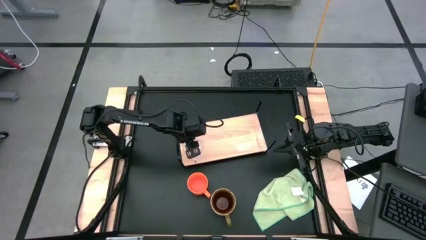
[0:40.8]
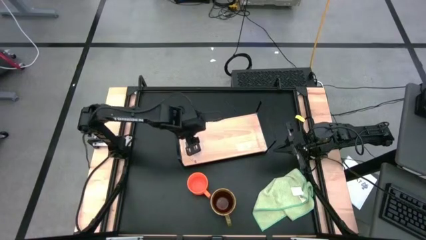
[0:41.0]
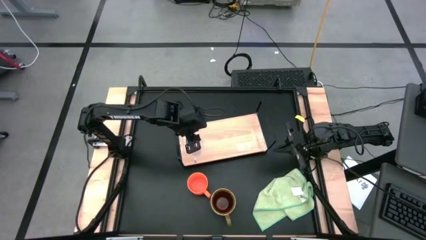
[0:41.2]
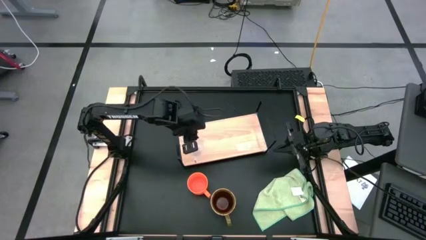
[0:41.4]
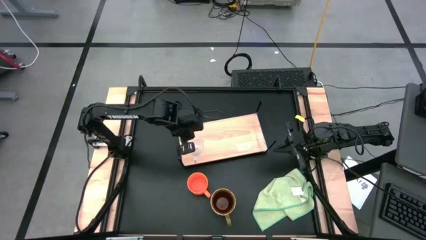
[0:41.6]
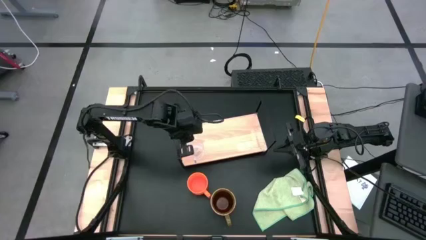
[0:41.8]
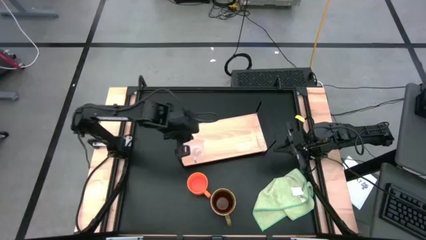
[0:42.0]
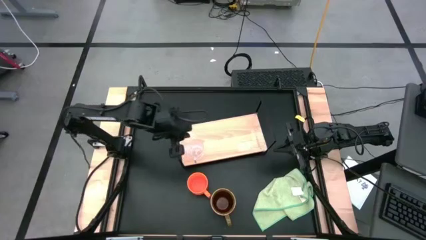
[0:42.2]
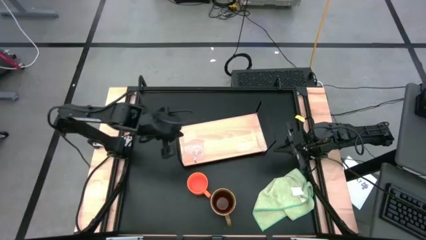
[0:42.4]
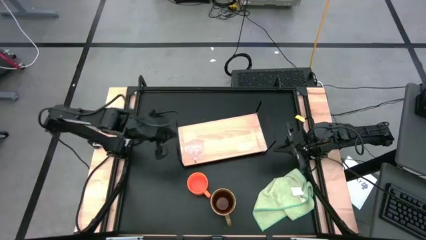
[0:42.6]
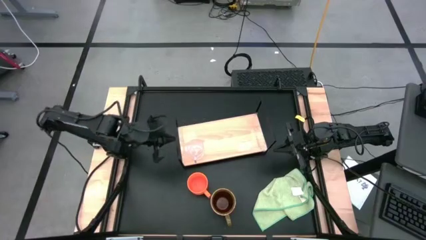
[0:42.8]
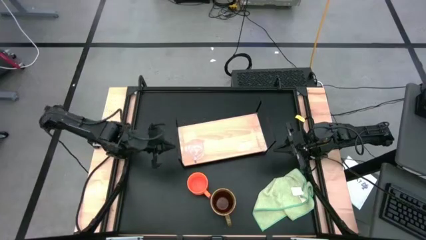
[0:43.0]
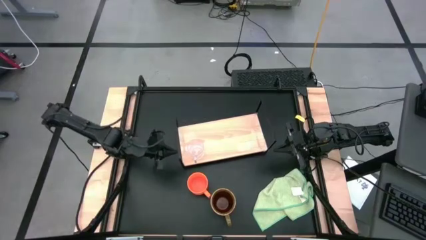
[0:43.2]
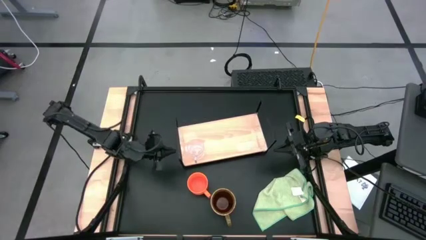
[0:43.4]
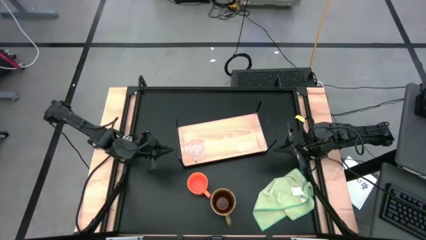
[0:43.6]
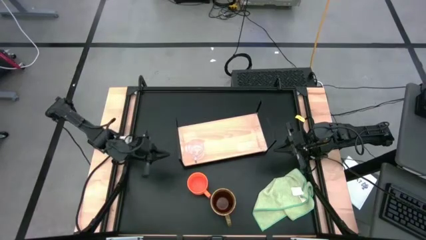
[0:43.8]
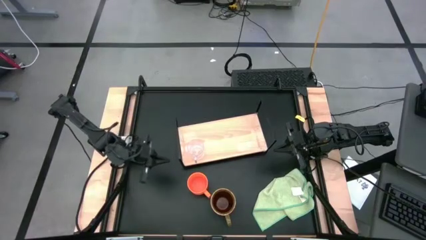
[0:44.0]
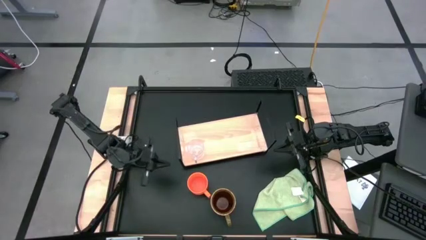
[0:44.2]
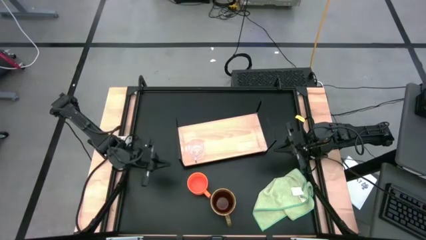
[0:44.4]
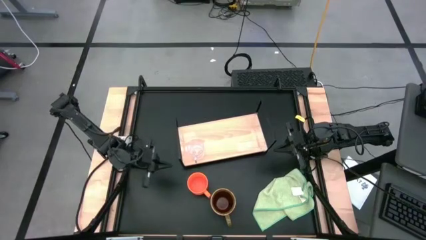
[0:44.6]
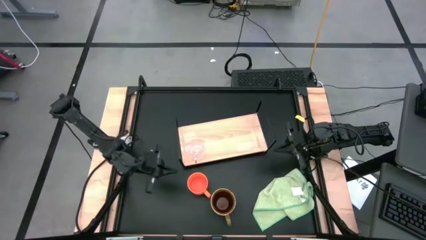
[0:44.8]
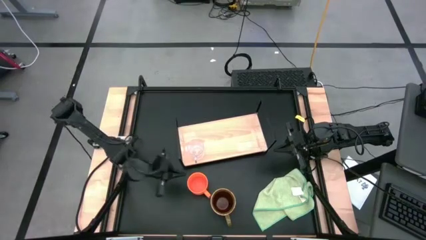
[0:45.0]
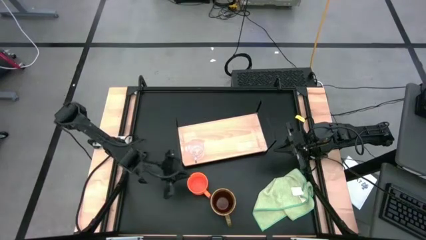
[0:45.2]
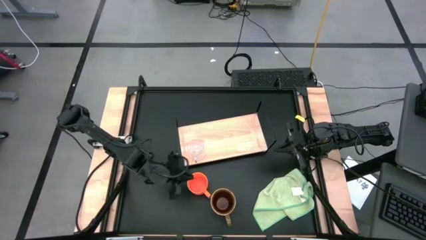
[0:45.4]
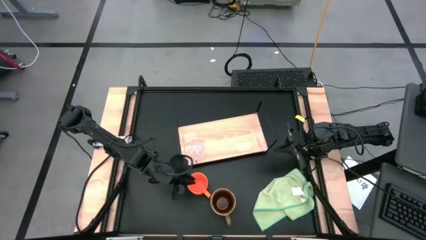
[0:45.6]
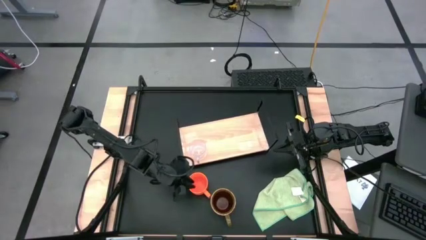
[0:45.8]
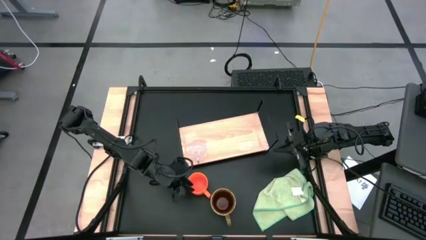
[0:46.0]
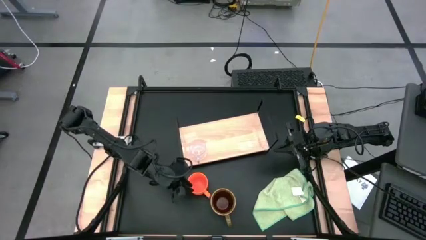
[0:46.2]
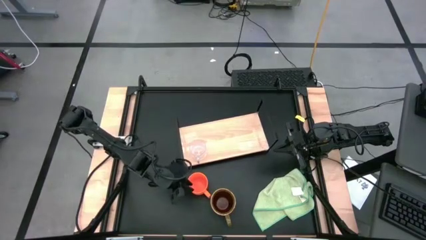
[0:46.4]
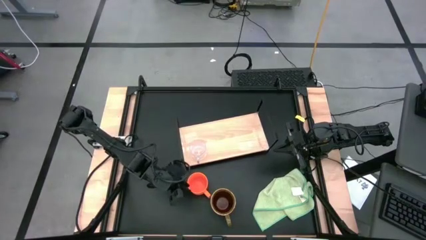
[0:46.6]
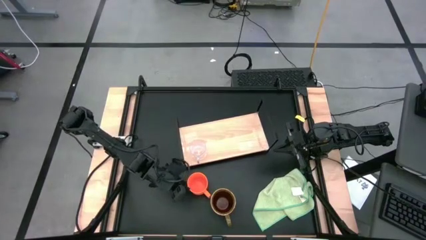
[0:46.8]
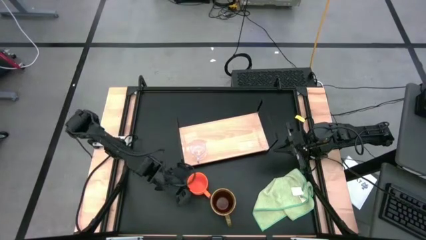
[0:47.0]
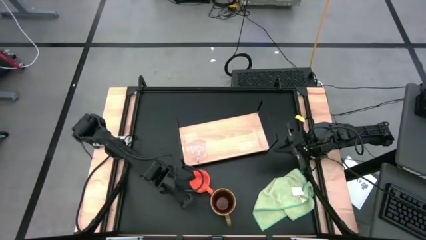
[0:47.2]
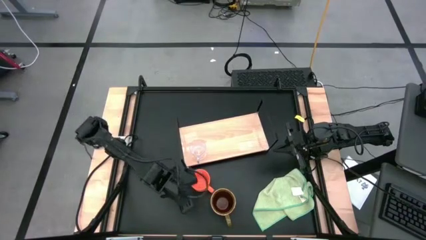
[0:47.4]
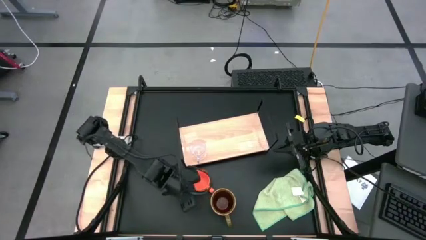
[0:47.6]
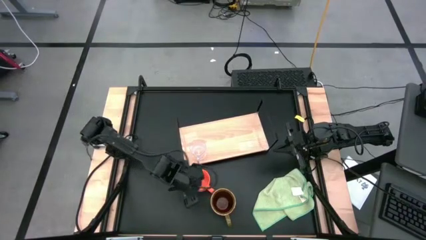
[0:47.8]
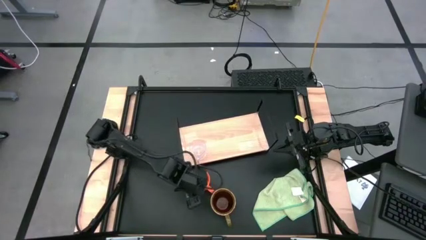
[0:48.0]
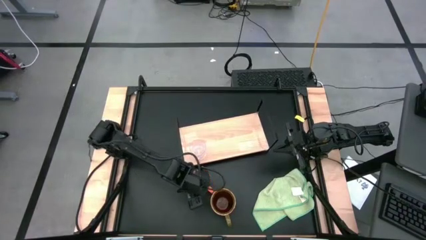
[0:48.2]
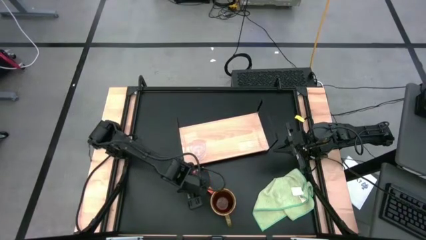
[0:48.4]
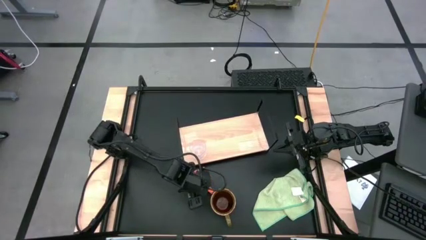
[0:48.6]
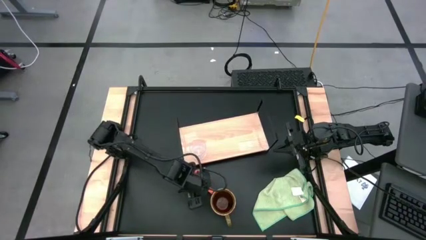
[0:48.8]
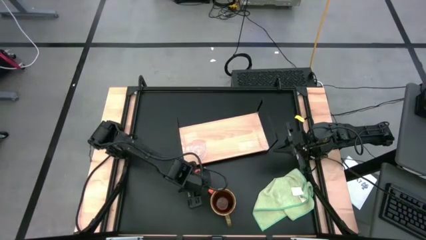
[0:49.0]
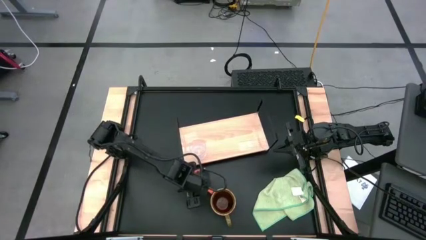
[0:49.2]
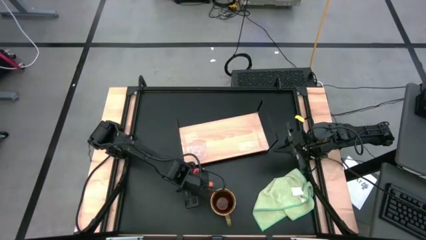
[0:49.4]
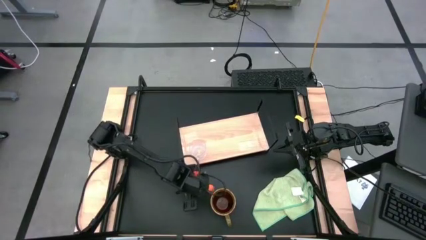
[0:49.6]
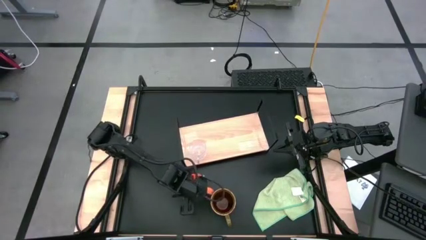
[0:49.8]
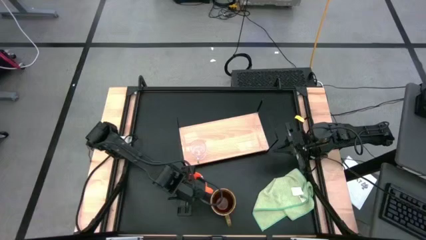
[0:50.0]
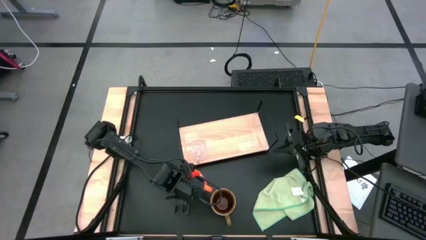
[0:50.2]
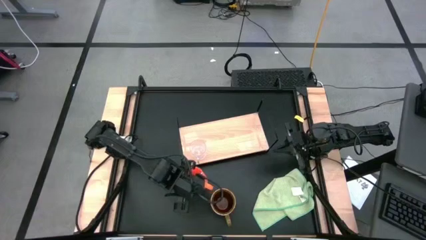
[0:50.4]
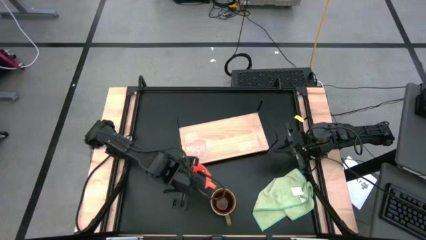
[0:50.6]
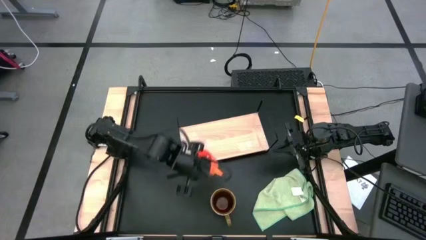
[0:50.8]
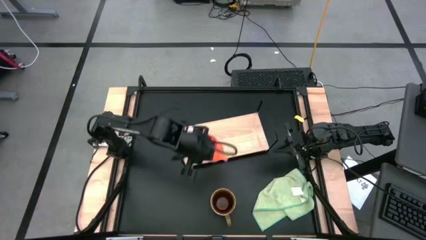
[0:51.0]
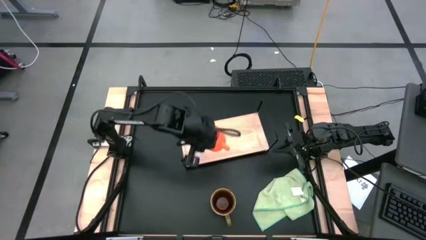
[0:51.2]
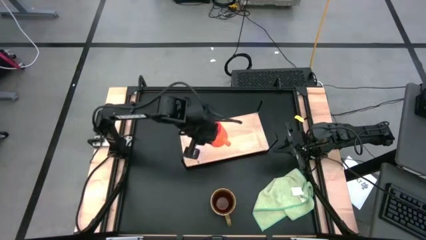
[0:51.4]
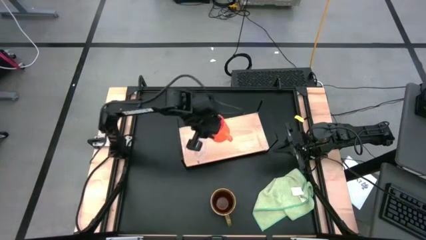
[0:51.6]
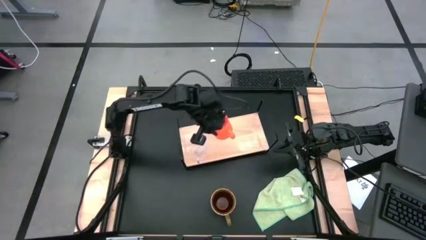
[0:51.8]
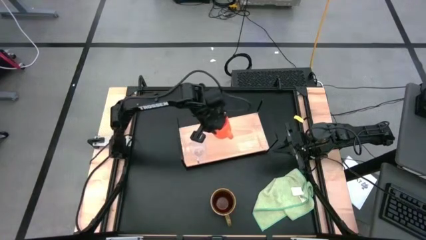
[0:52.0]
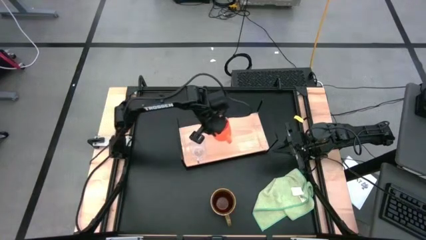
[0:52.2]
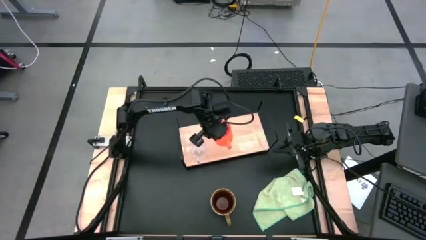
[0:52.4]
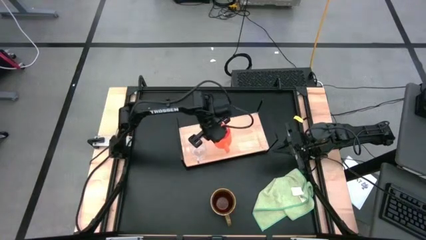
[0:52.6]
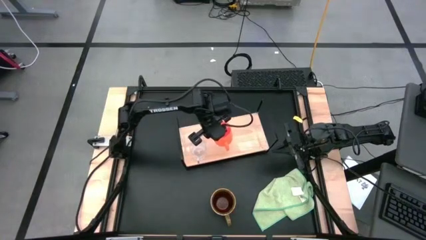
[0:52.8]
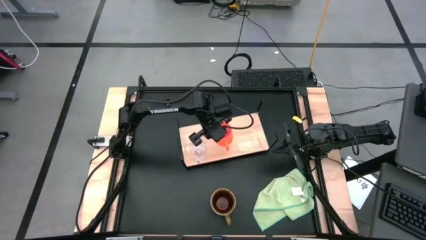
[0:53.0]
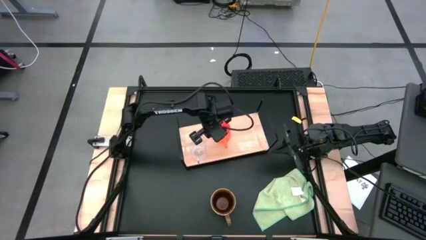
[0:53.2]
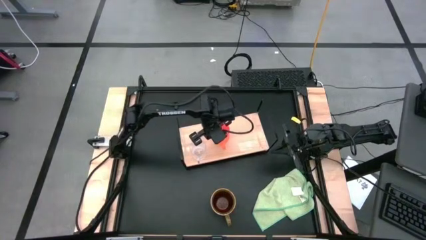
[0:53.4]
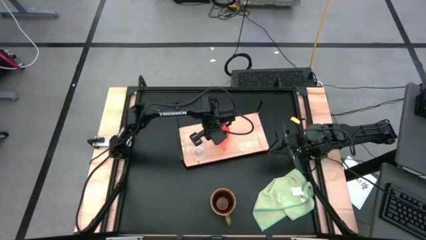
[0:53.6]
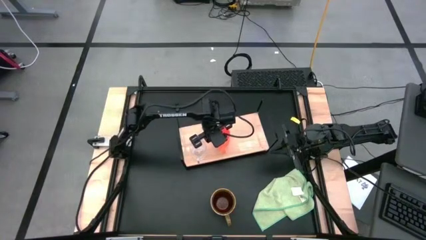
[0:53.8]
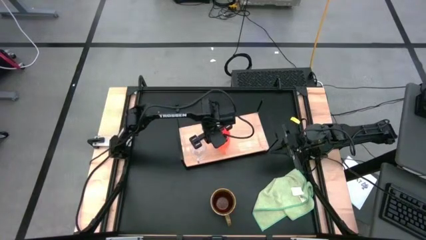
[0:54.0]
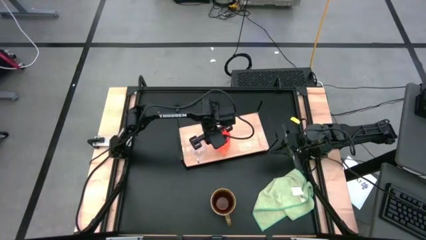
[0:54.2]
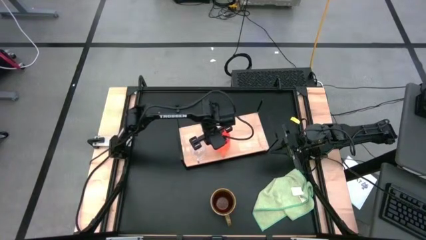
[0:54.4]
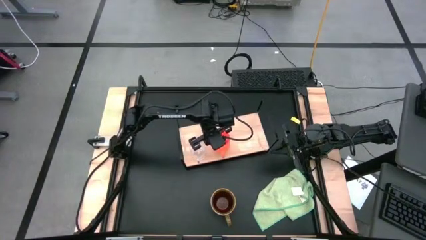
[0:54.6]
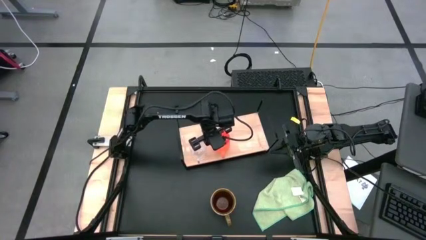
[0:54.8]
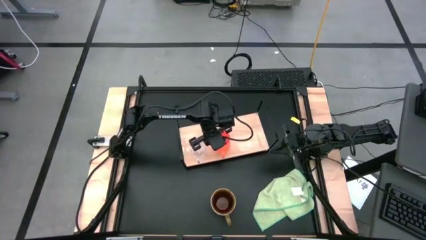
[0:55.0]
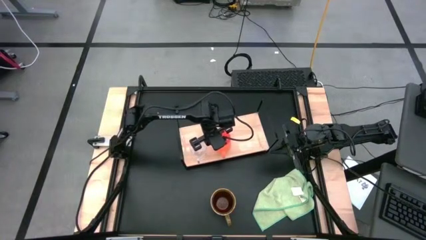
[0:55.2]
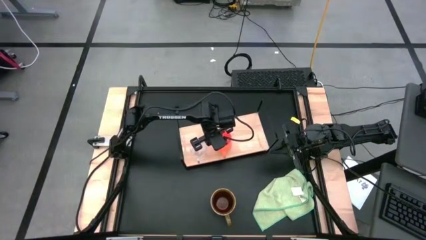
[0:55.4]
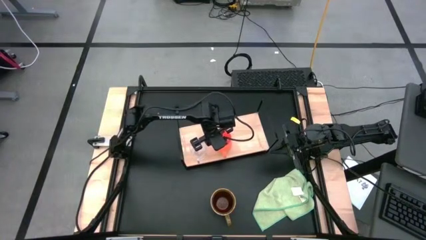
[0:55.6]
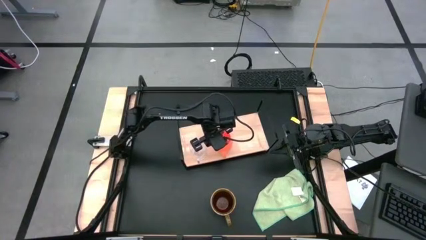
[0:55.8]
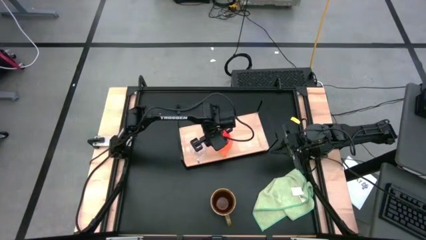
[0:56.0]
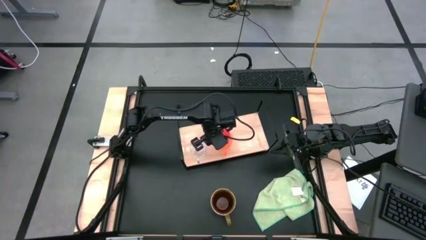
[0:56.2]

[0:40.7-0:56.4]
Task: Stack small to large cups/mugs on shelf
Put the orange mug on the shelf
